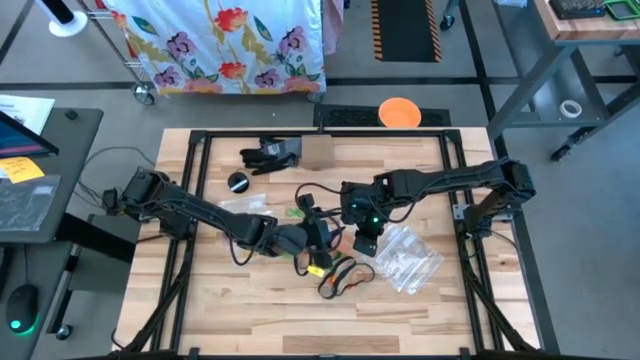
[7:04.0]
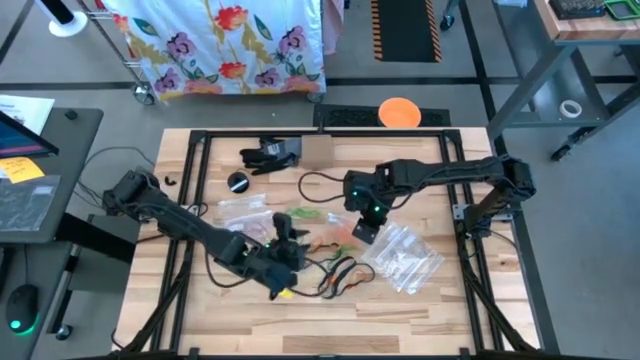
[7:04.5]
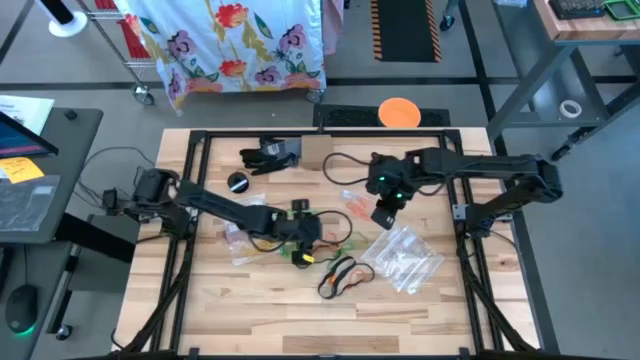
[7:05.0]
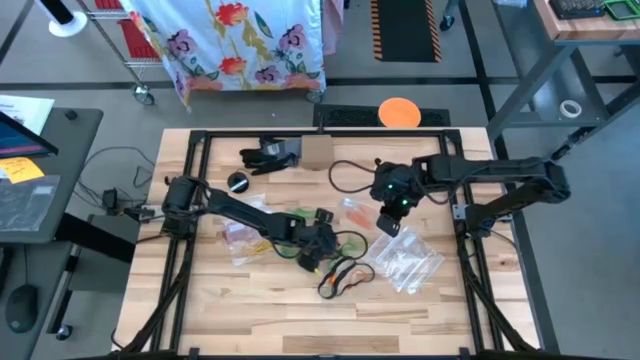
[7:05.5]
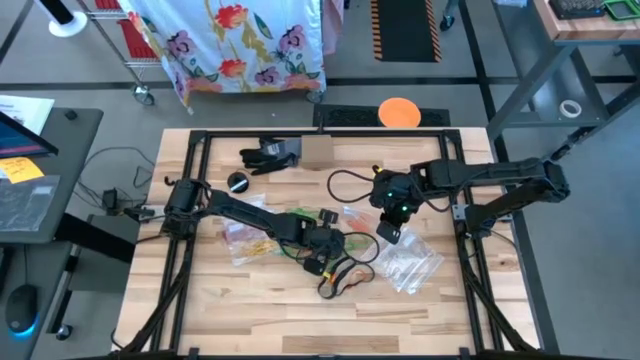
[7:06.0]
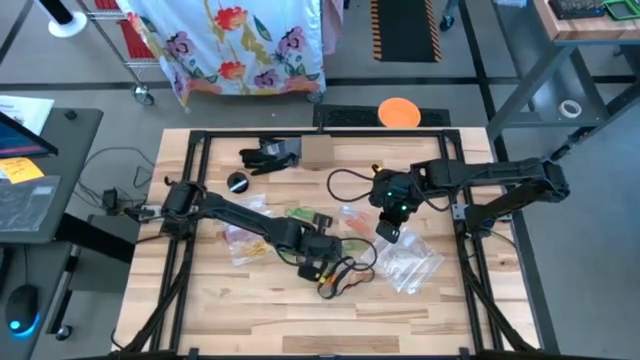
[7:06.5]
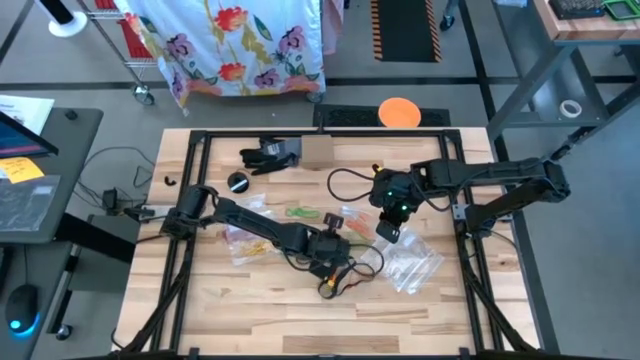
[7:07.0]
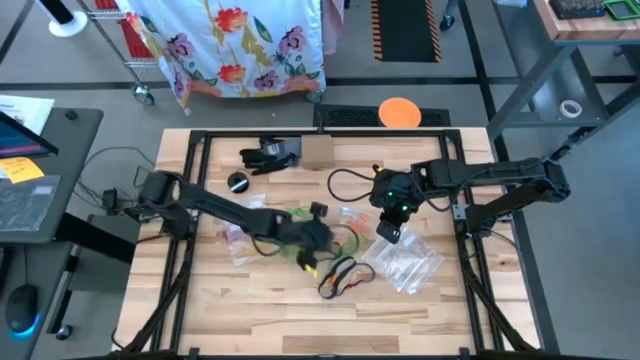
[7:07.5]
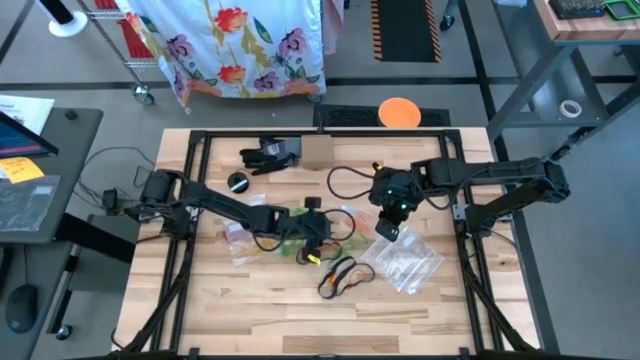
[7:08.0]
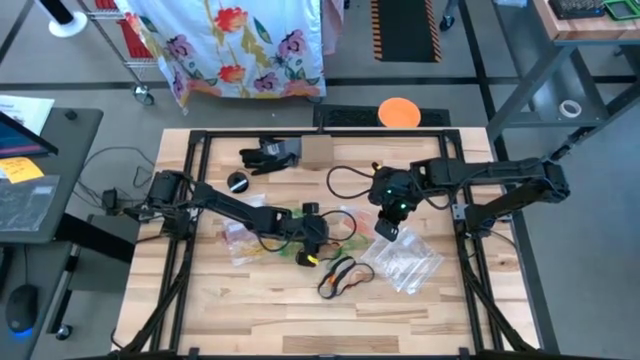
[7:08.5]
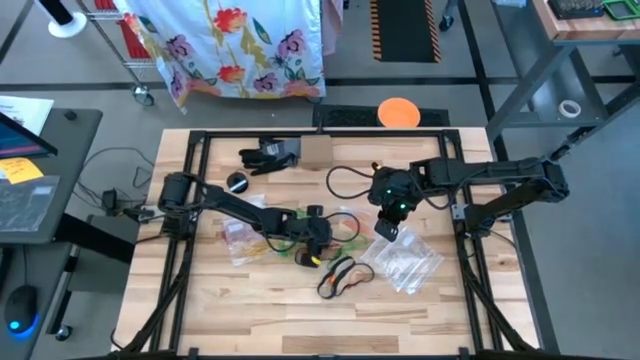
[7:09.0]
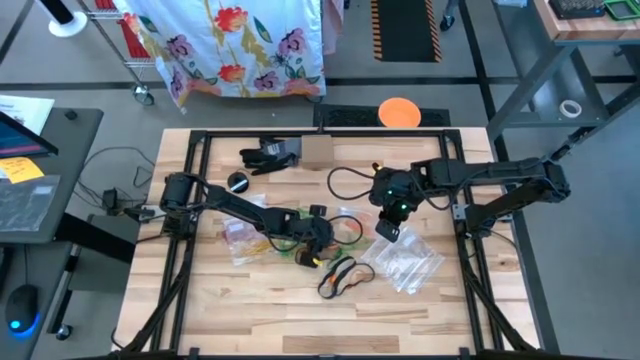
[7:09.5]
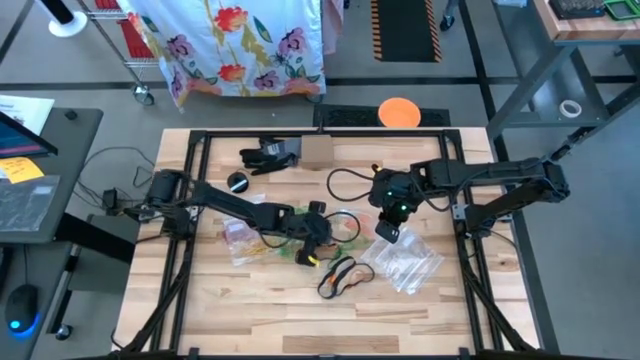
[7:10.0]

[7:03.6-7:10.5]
Task: Sort rubber bands
Put the orange rubber band into the transparent zip tie

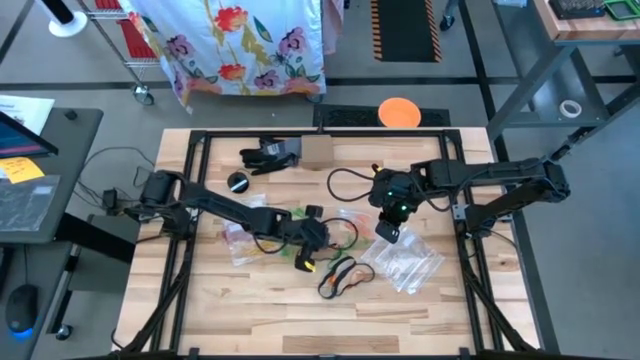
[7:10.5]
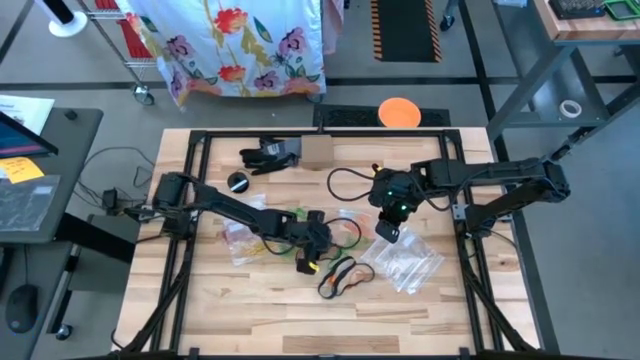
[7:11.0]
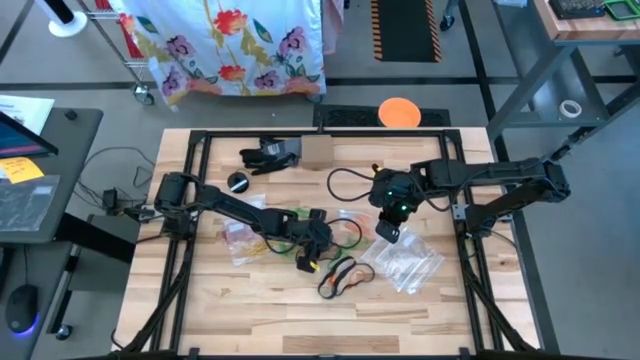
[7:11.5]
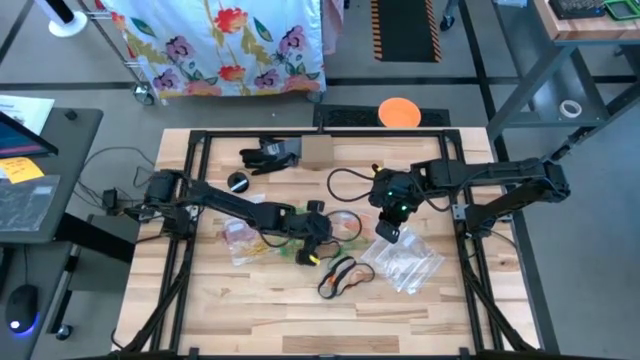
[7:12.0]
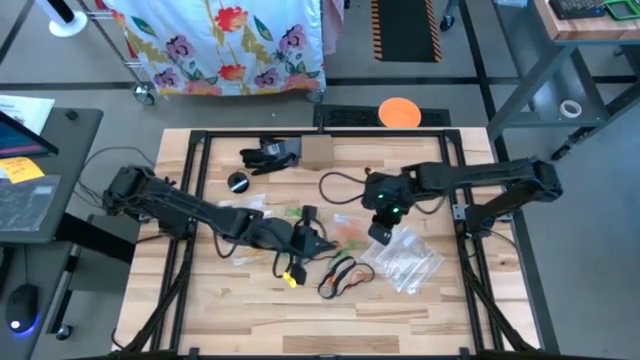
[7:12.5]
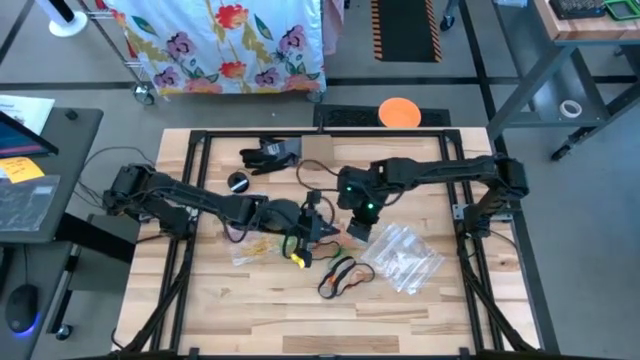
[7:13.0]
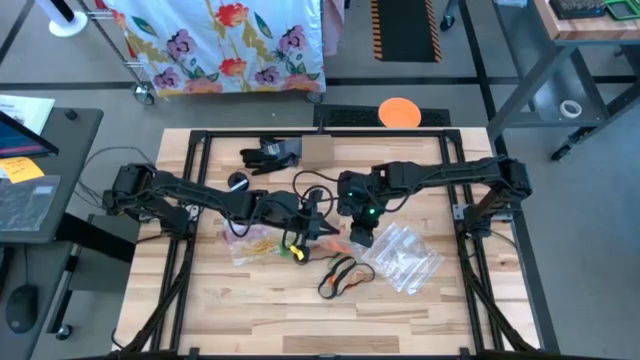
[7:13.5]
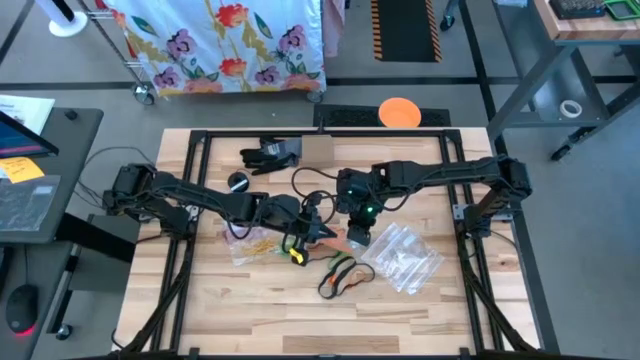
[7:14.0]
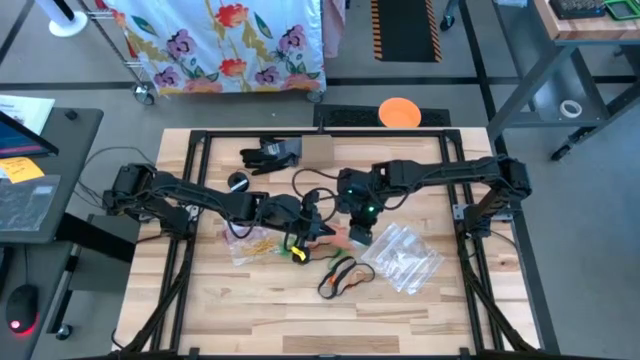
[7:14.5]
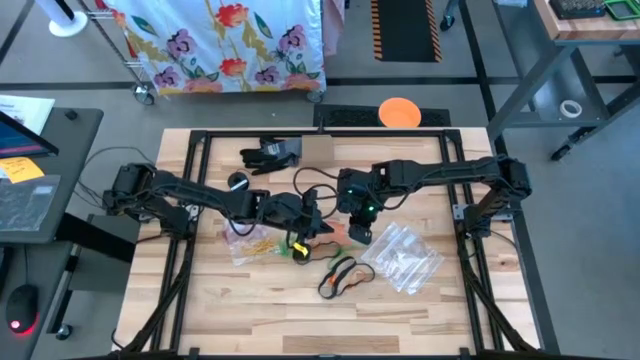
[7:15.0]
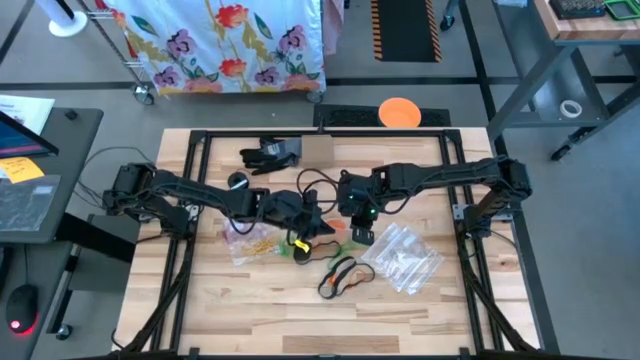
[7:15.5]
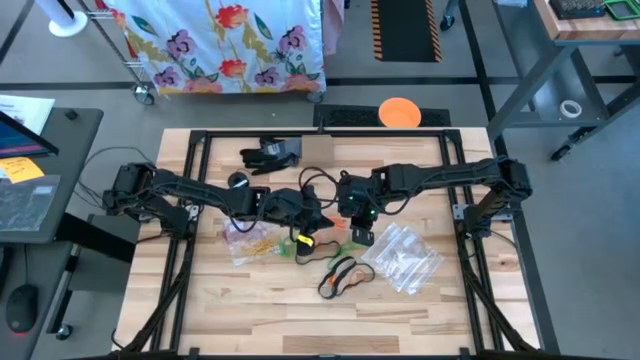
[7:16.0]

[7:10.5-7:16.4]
Put the orange rubber band into the transparent zip bag

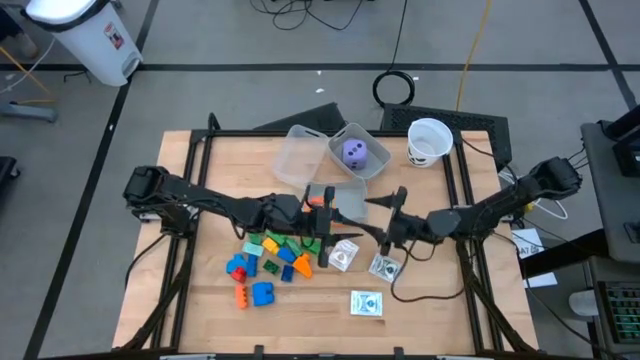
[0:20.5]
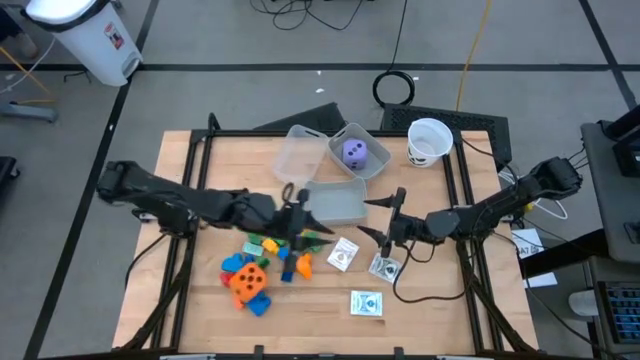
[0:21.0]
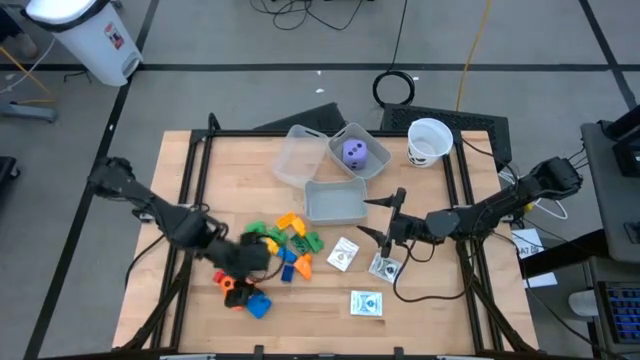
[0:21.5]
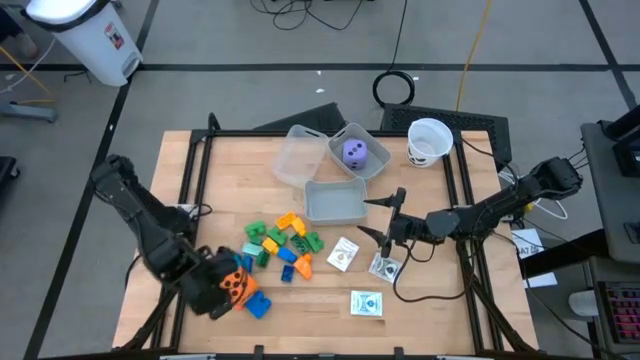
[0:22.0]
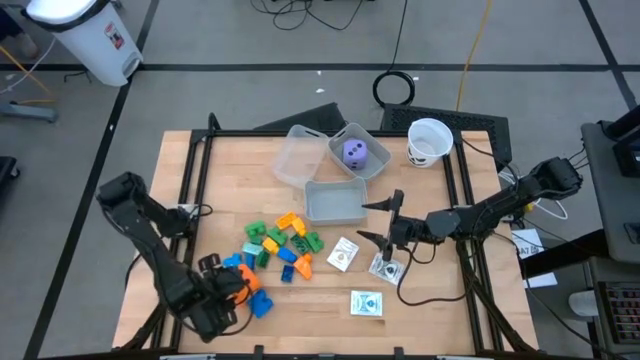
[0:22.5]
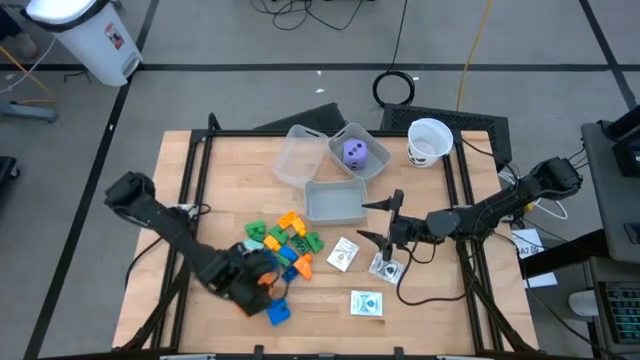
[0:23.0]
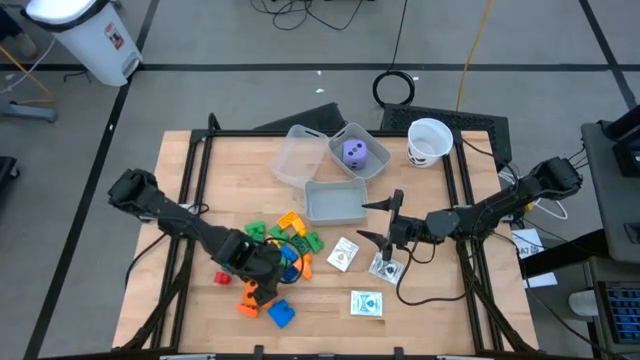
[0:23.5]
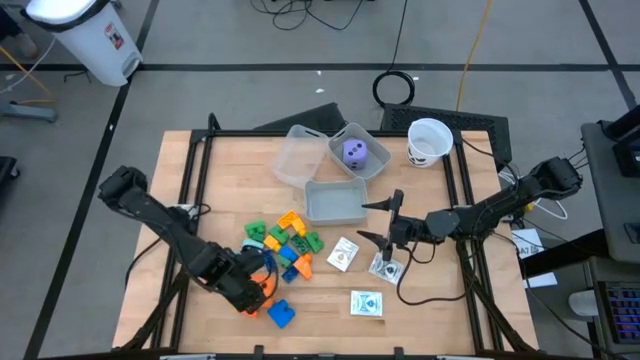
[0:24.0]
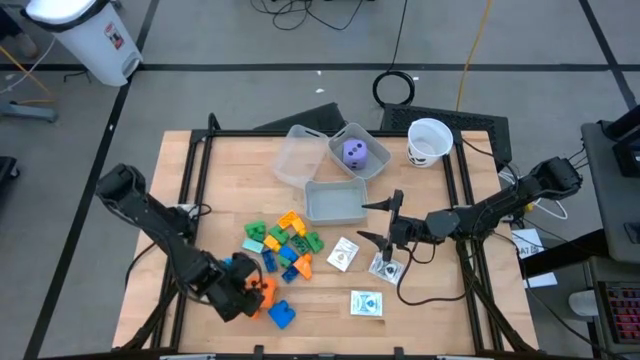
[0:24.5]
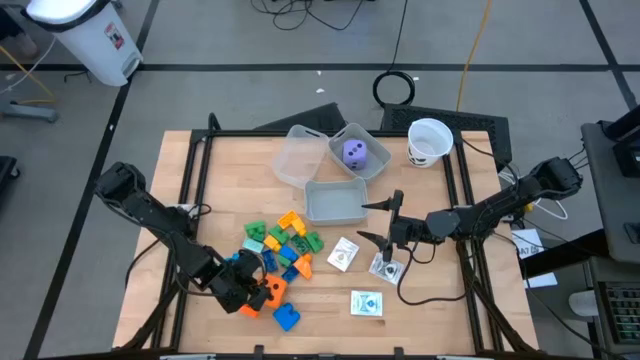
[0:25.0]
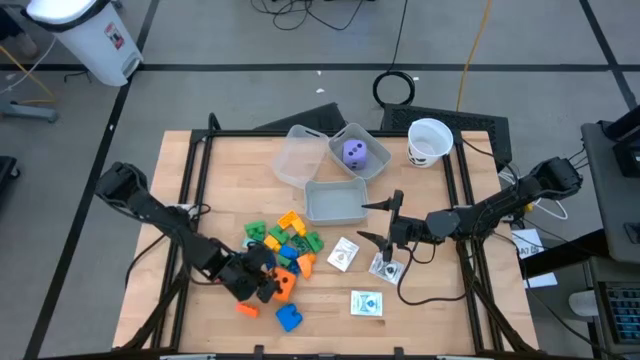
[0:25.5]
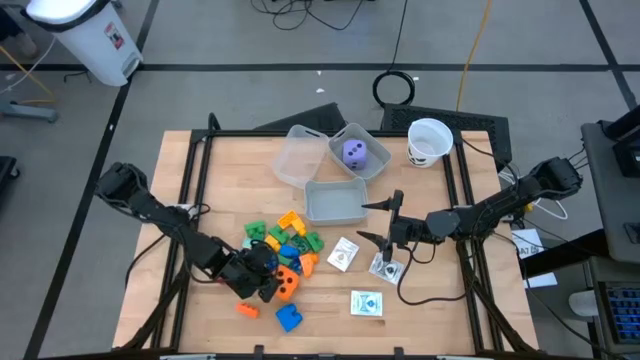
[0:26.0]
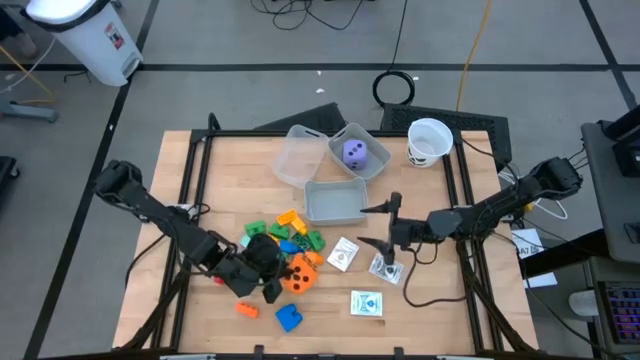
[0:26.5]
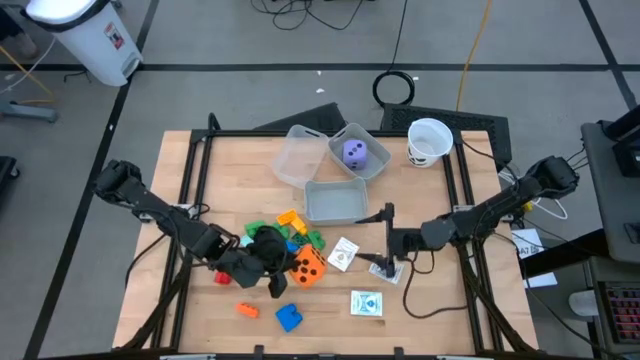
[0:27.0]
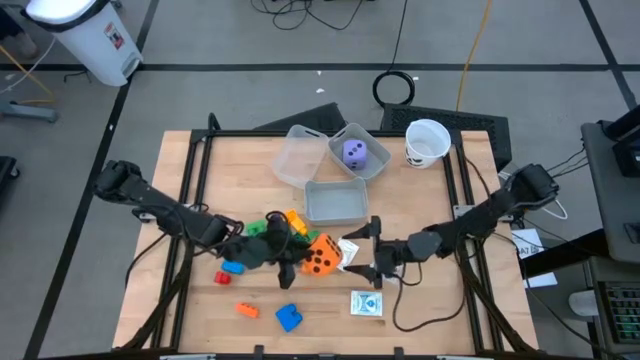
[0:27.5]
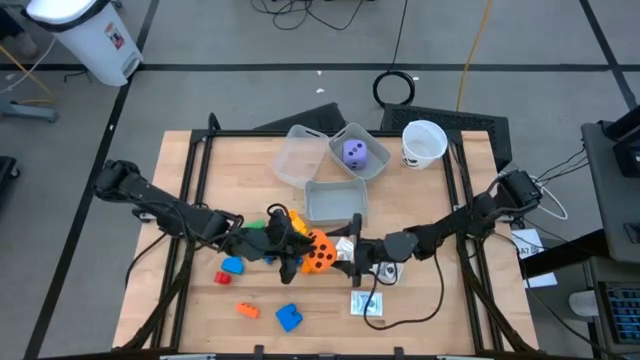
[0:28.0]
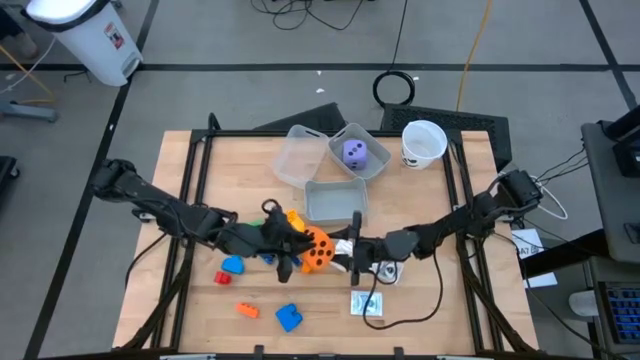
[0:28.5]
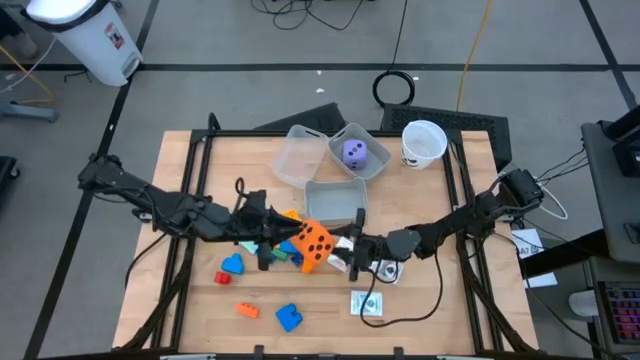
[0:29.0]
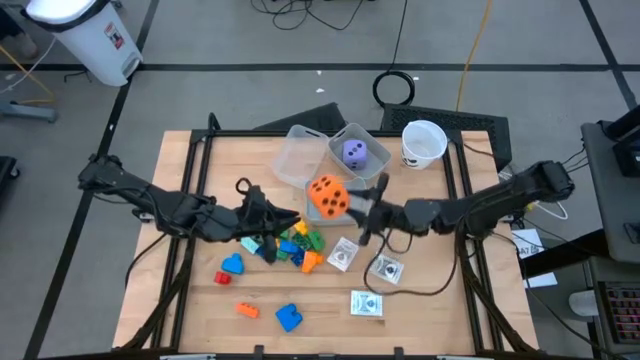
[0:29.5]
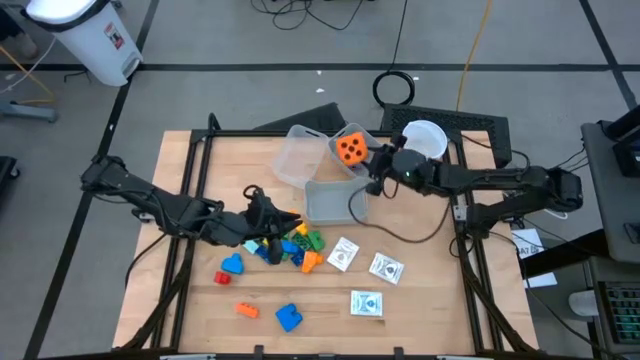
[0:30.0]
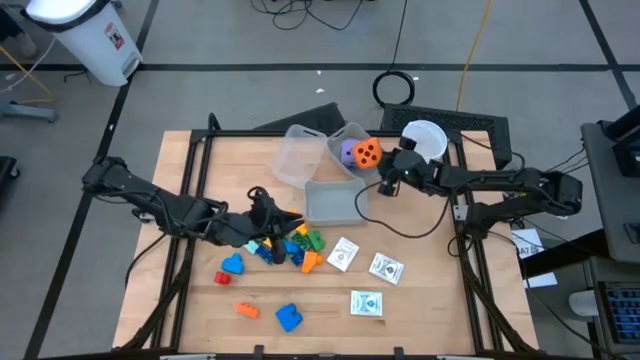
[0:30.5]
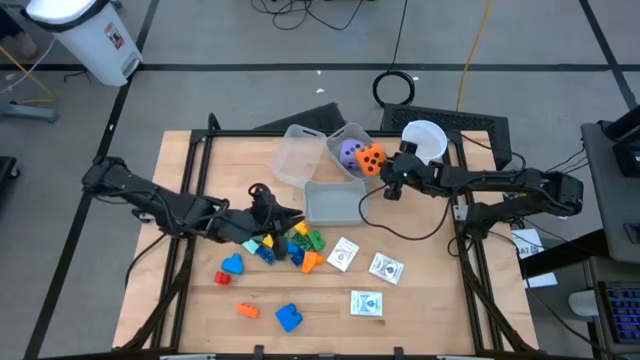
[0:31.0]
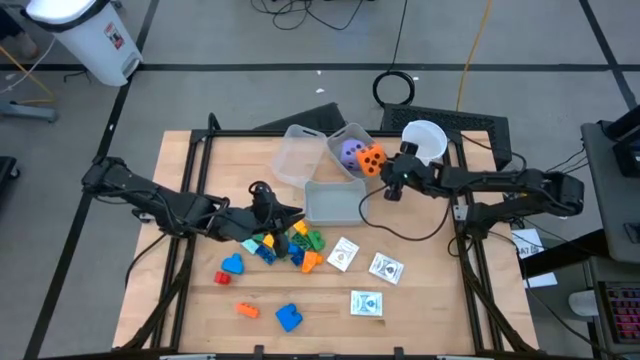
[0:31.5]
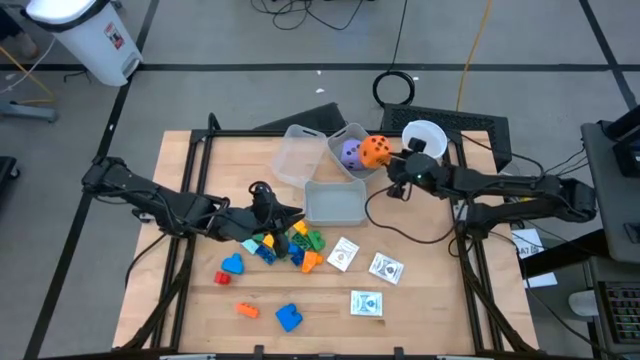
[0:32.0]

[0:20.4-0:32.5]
Task: Pick & Place Toys
Put the orange die into the top gray bin
